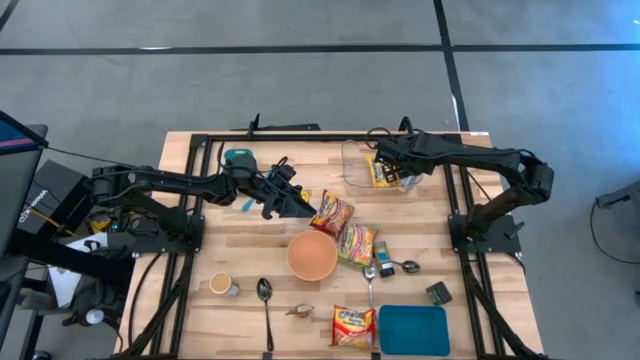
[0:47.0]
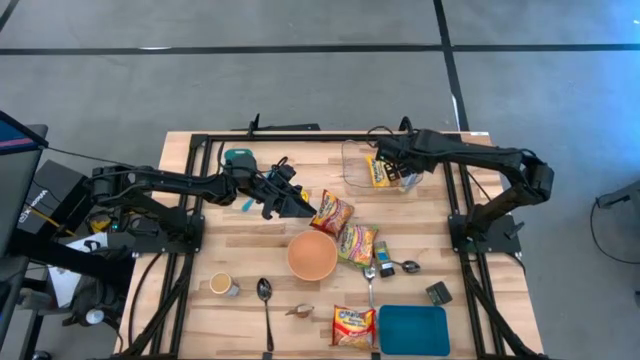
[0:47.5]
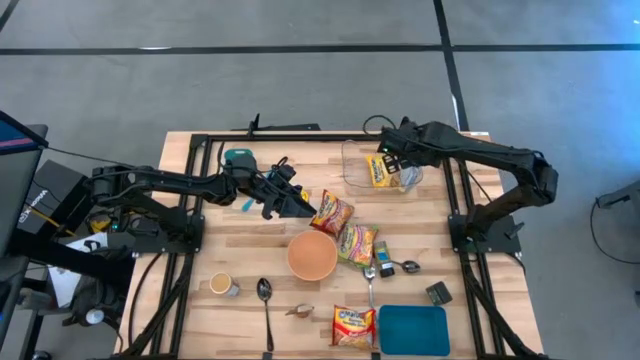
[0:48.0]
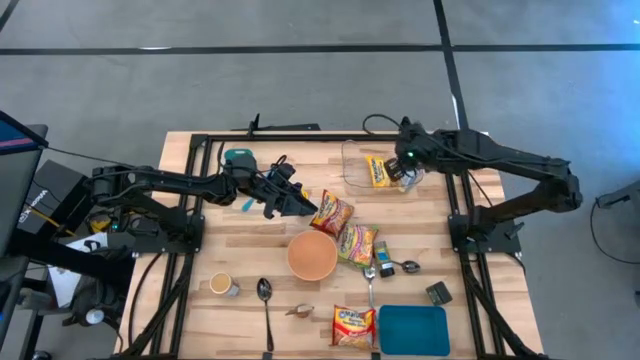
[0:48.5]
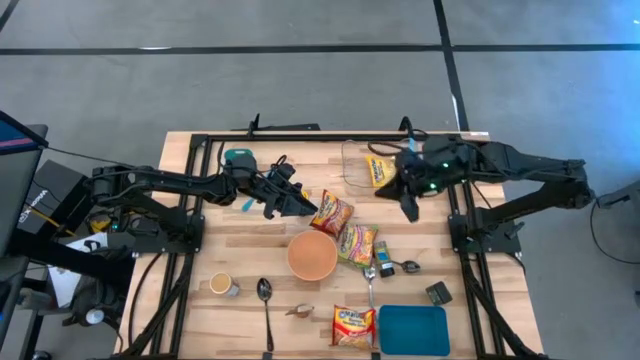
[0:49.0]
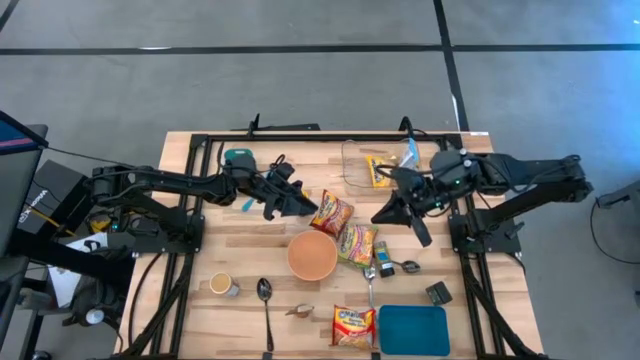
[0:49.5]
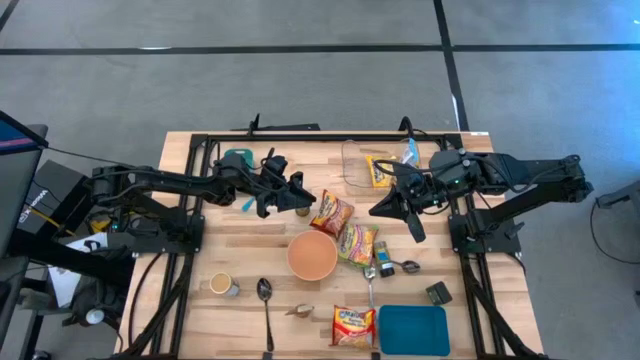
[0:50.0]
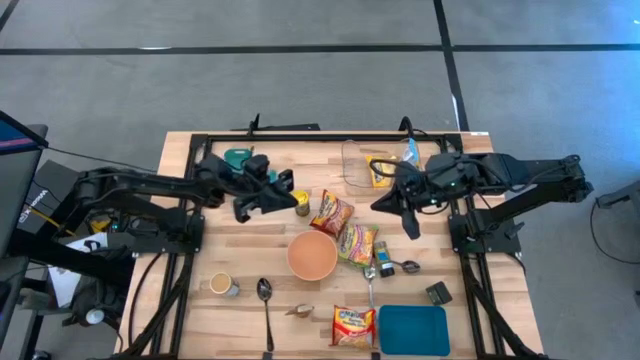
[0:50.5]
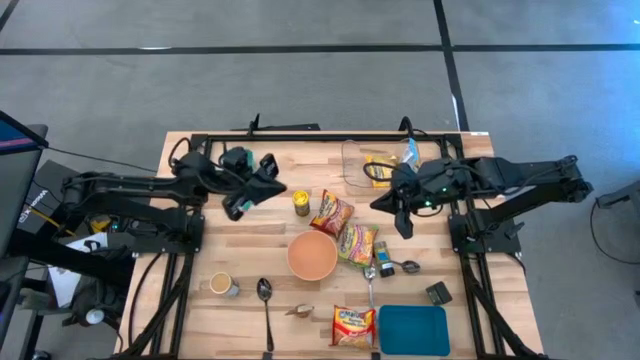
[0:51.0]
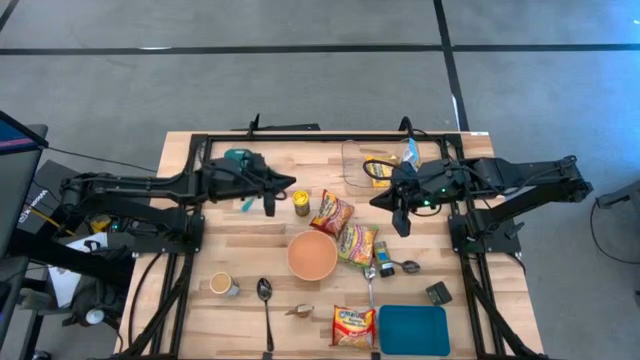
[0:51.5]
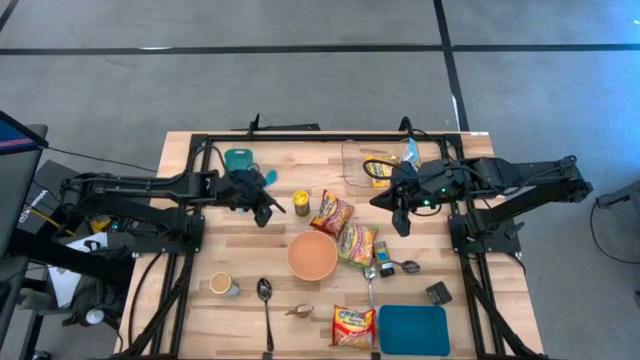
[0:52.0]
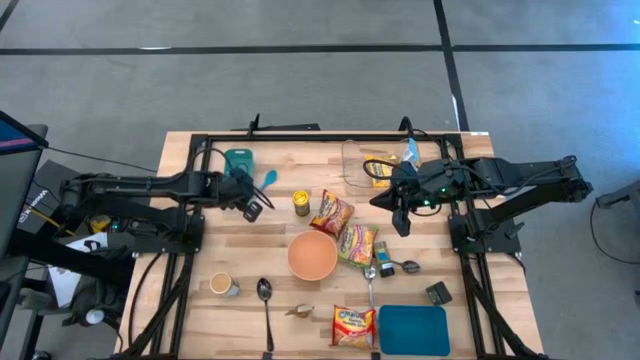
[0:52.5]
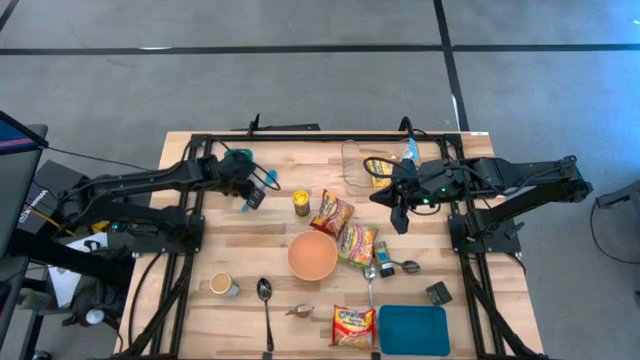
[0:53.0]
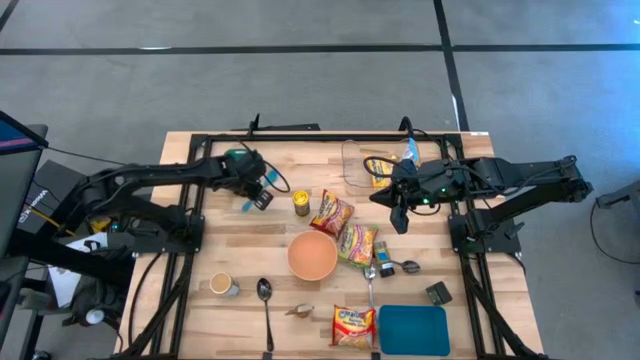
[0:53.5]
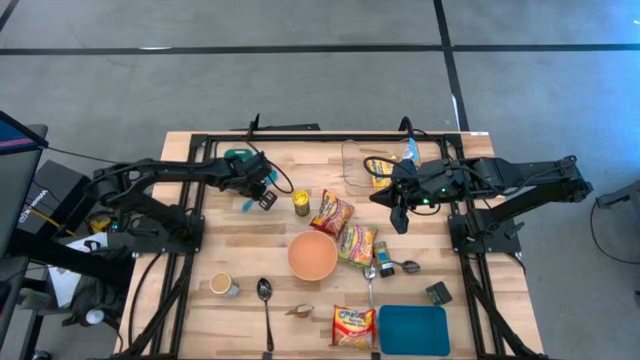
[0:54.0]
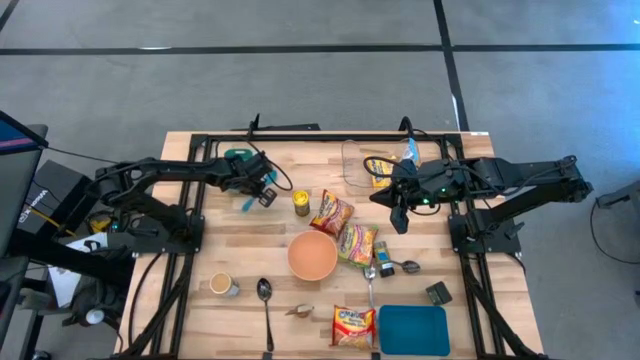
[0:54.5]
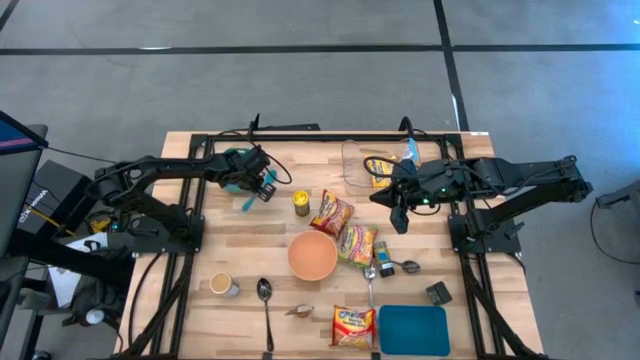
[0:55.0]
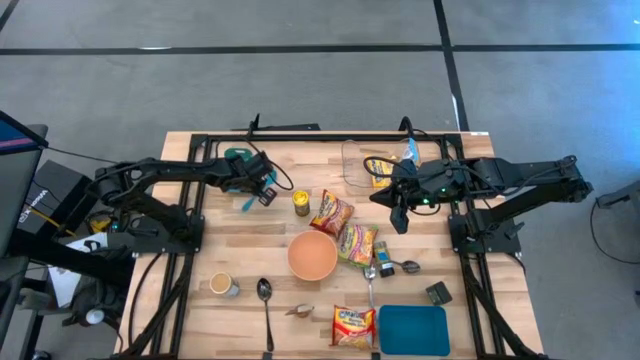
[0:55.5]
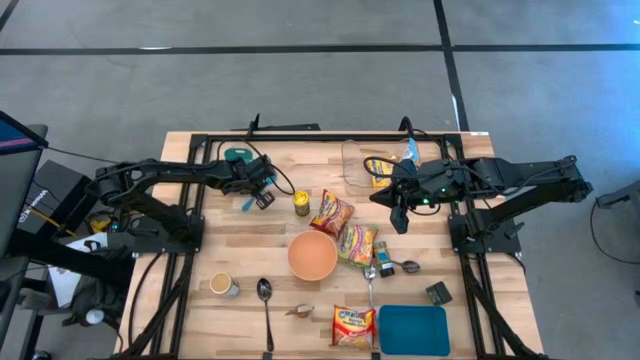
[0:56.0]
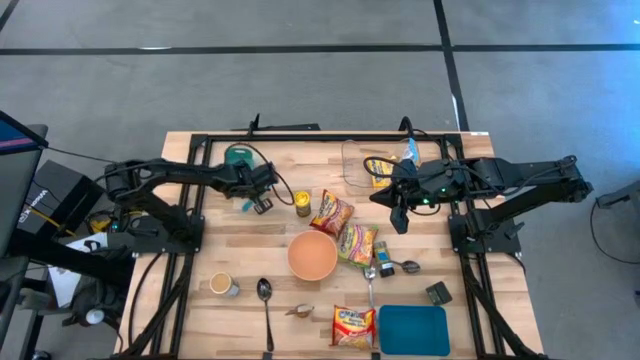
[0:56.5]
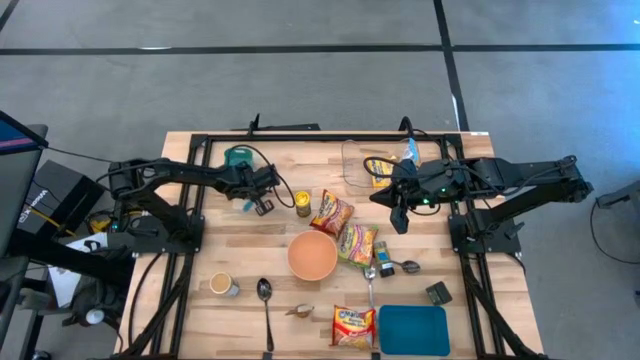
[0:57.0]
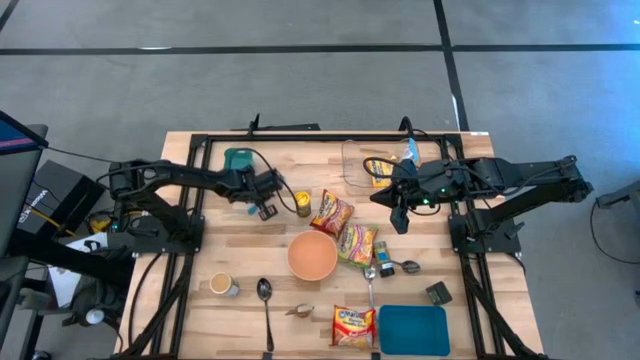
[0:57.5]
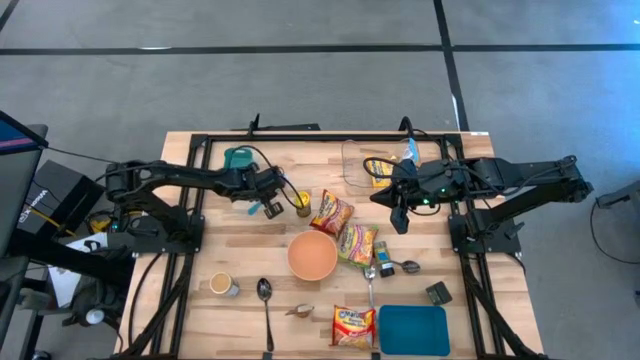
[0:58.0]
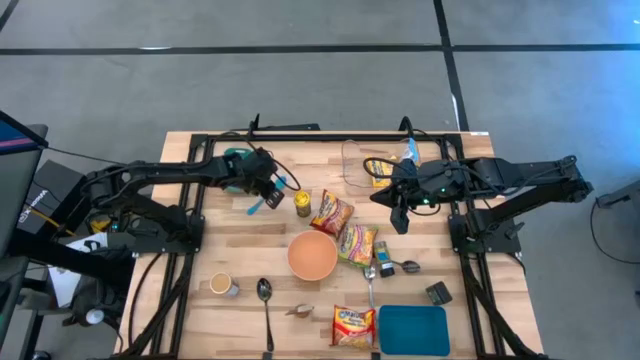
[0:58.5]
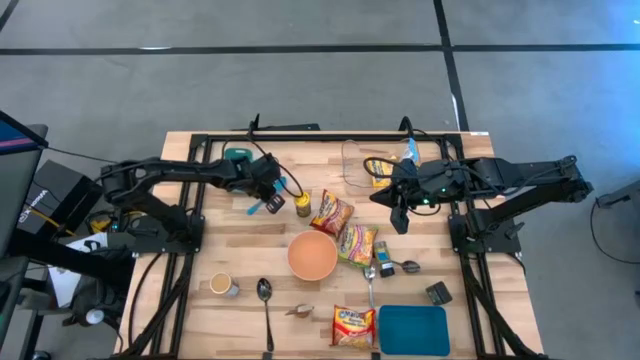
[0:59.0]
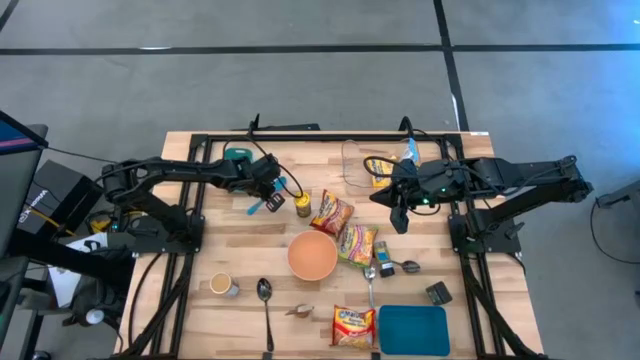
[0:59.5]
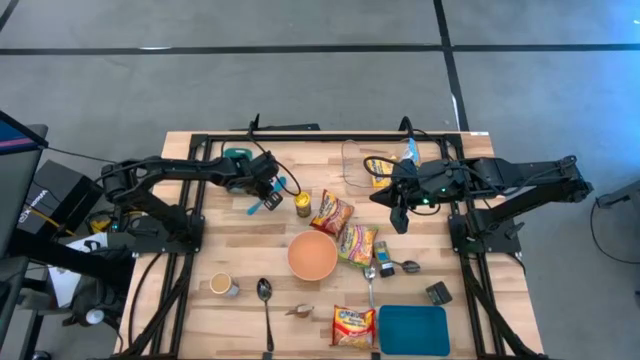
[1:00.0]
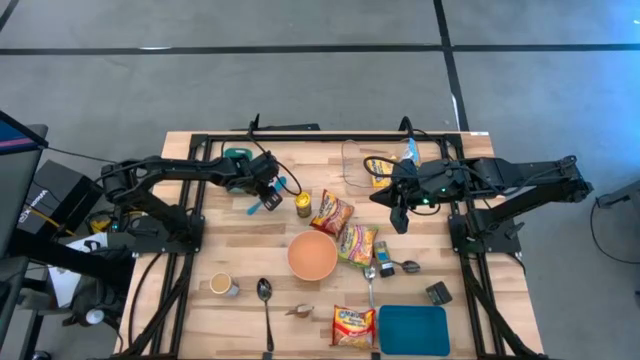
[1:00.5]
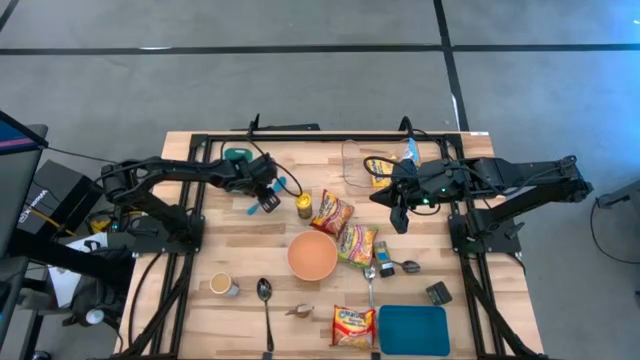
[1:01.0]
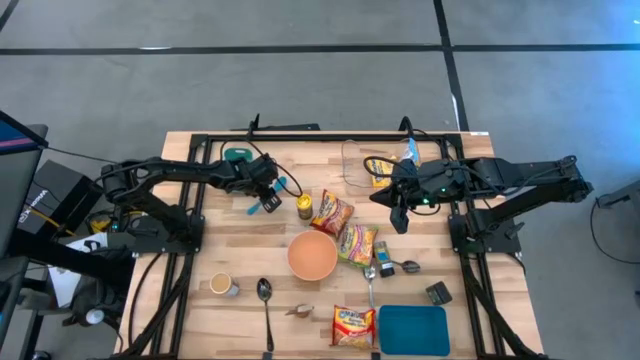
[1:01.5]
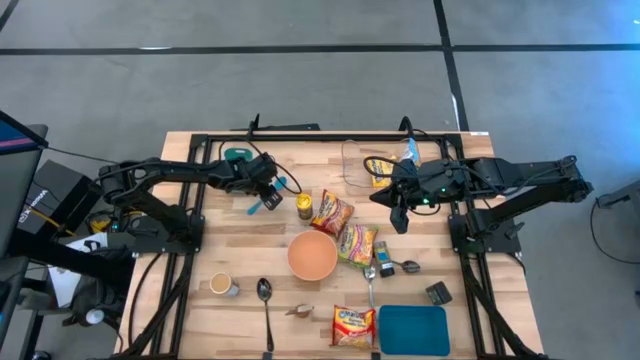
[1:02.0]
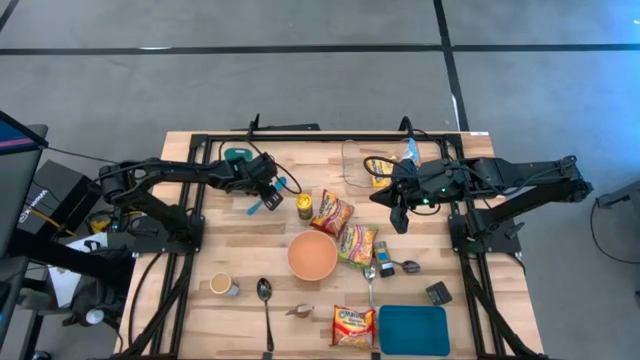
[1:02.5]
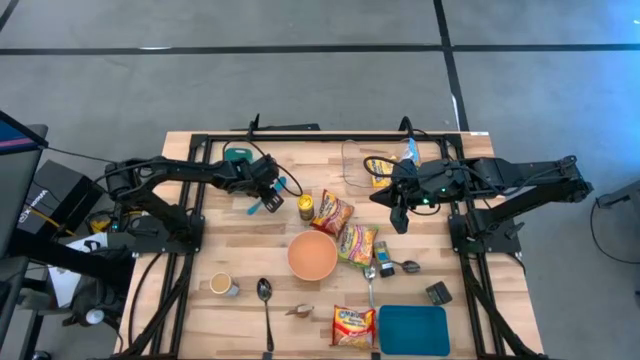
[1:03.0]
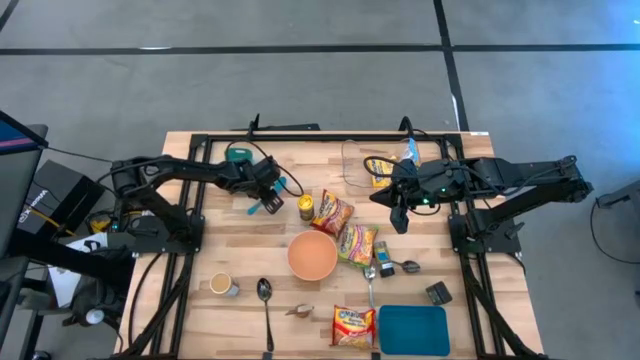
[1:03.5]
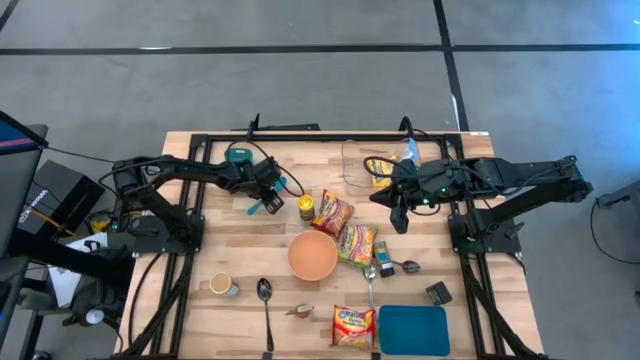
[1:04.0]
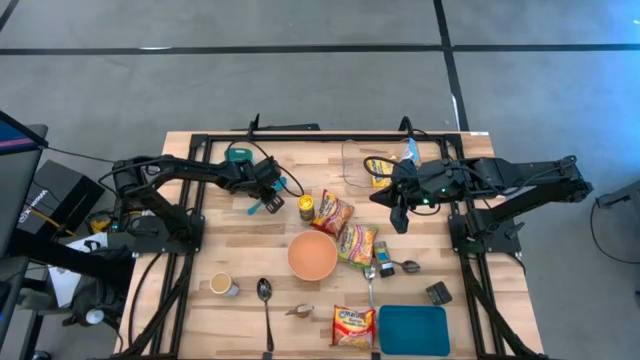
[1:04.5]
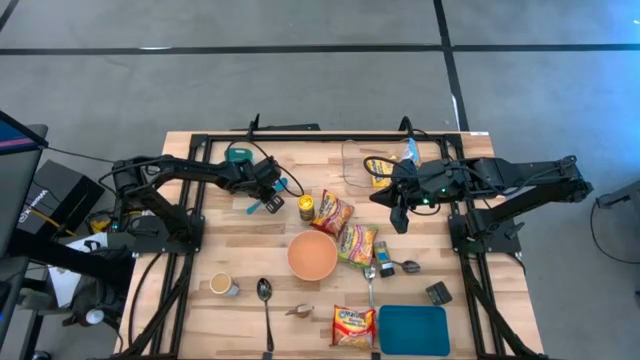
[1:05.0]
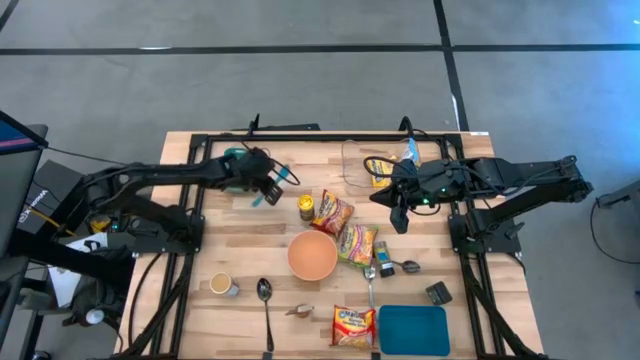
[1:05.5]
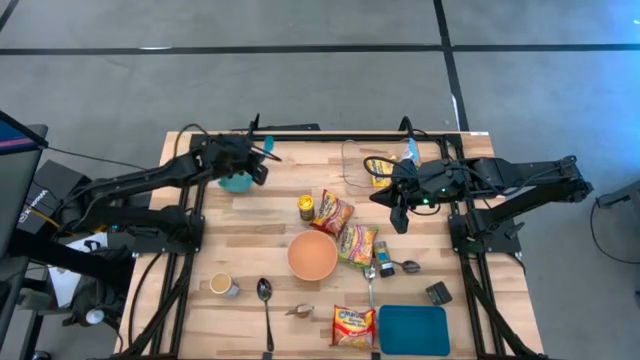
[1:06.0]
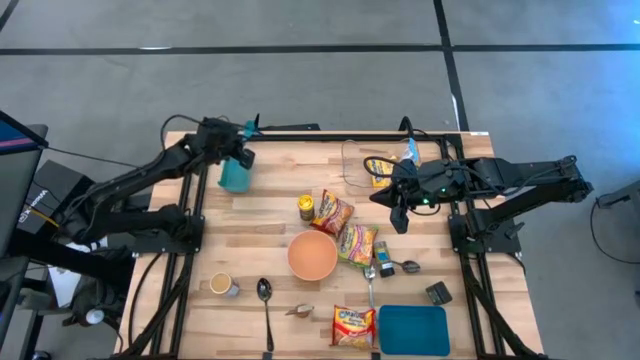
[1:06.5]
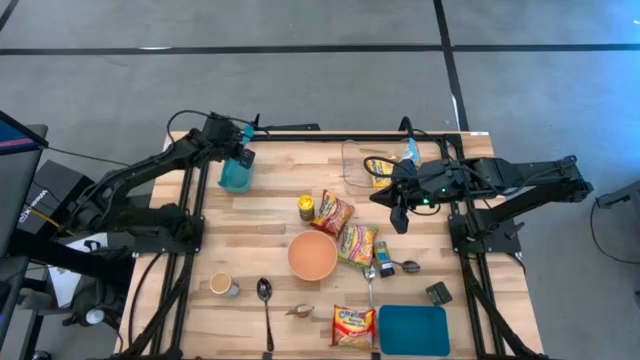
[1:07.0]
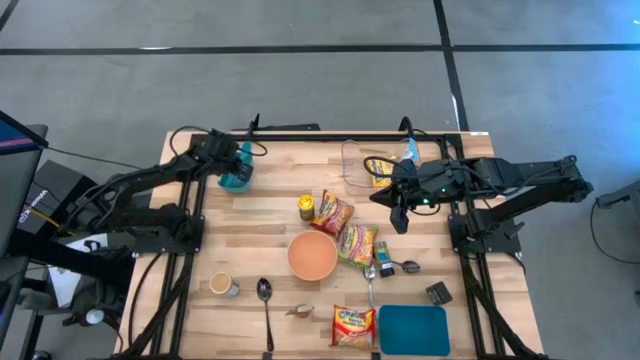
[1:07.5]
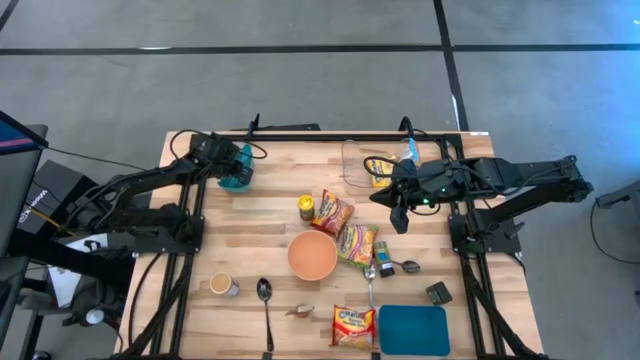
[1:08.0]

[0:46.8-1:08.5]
Task: Pick & Place Food Item
Put the blue baby spoon into the light green bin

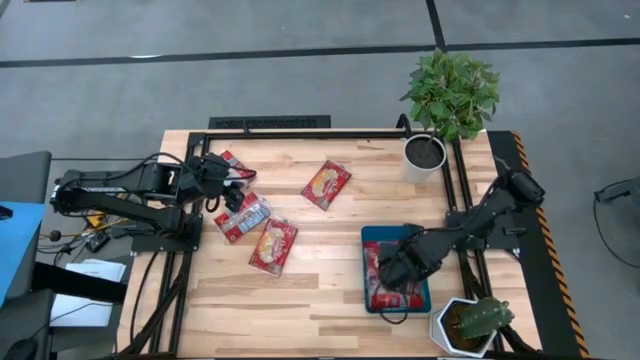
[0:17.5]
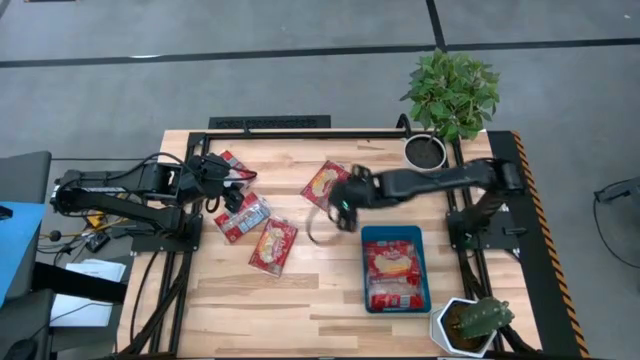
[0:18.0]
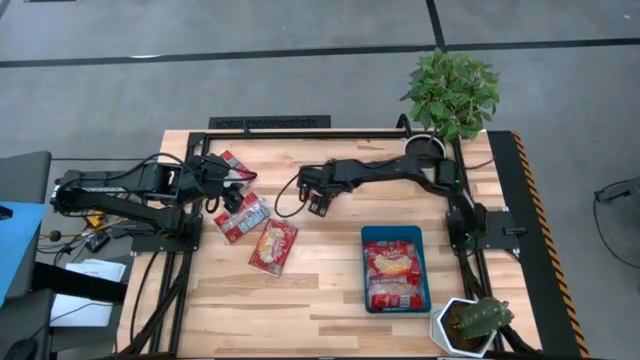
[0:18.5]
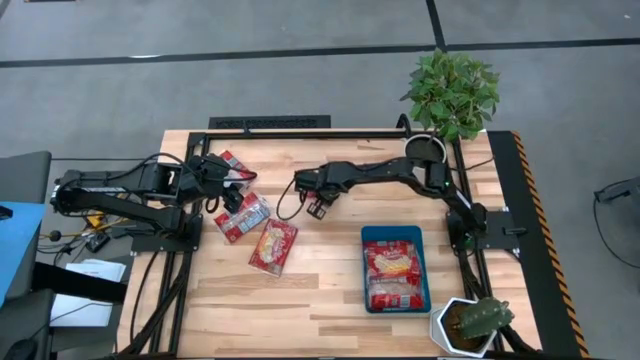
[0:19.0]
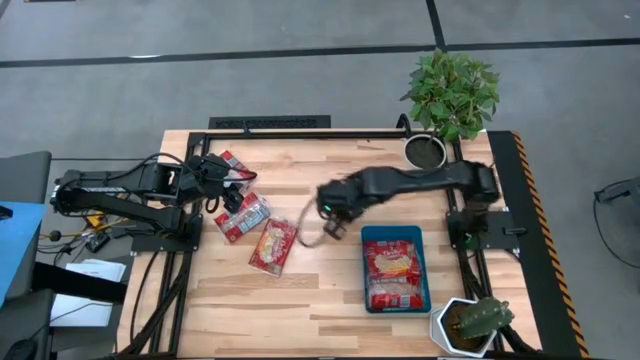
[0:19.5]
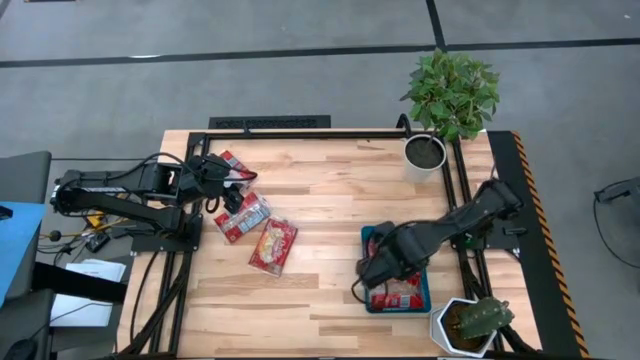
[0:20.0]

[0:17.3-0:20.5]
Task: Sort popcorn bags into baskets
Put the red popcorn bag into the blue bin
